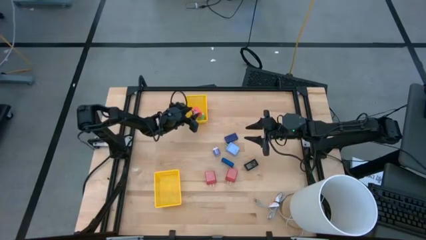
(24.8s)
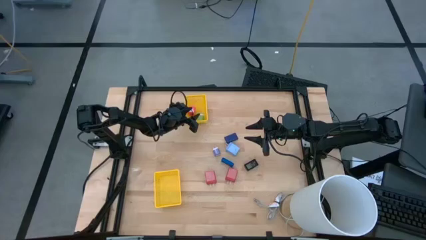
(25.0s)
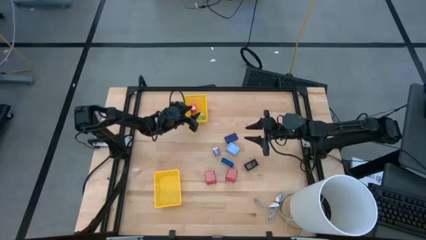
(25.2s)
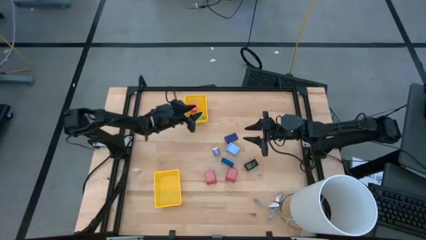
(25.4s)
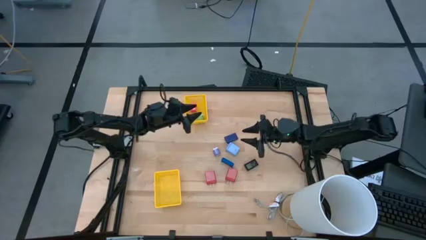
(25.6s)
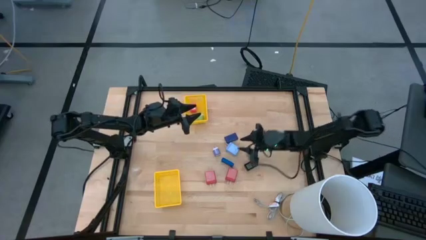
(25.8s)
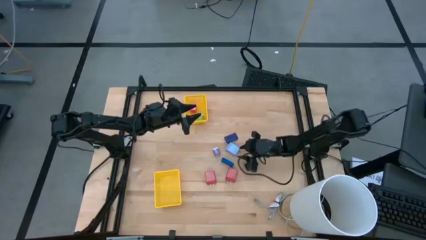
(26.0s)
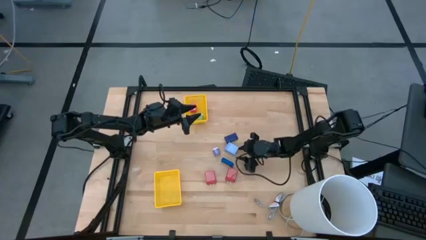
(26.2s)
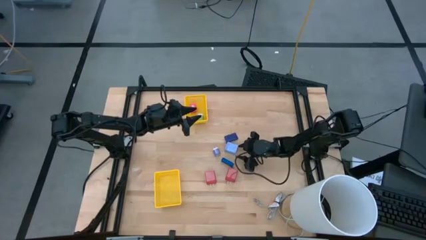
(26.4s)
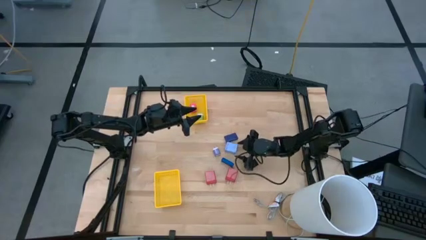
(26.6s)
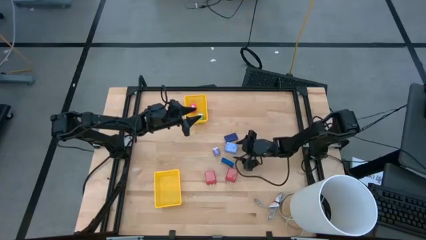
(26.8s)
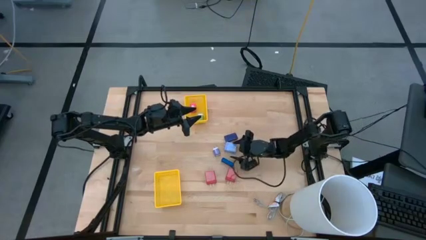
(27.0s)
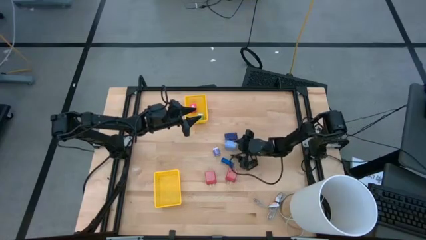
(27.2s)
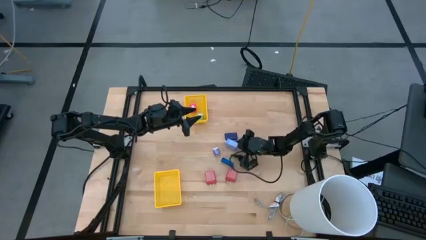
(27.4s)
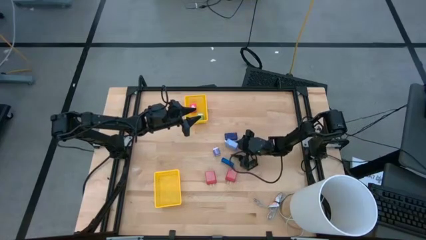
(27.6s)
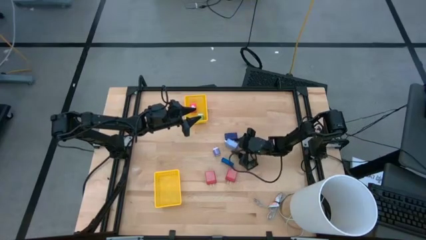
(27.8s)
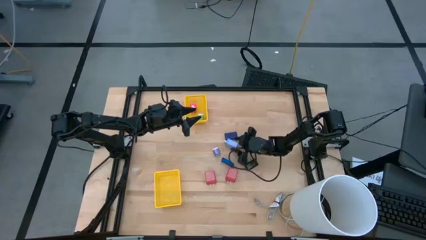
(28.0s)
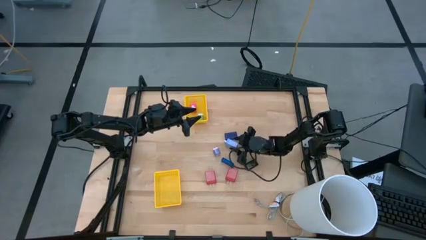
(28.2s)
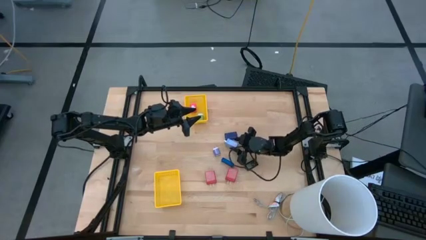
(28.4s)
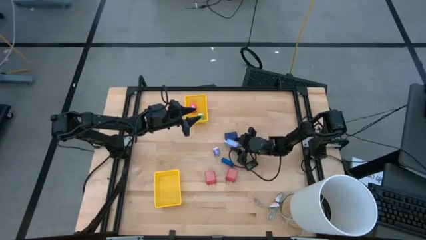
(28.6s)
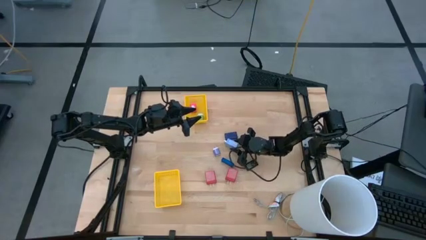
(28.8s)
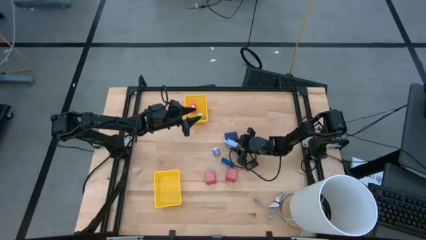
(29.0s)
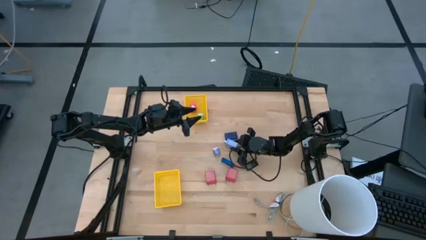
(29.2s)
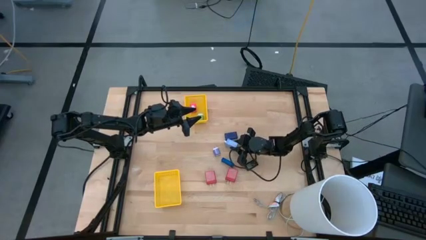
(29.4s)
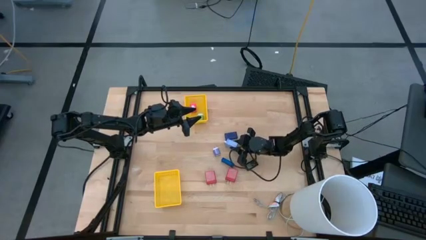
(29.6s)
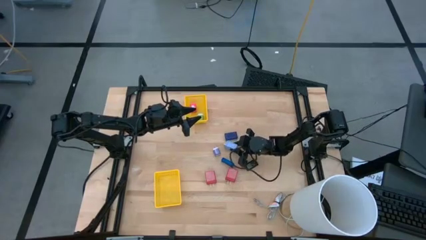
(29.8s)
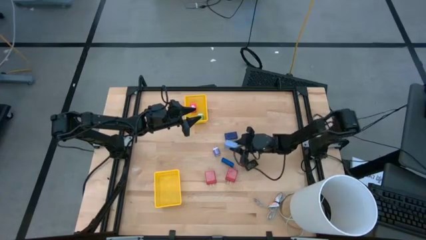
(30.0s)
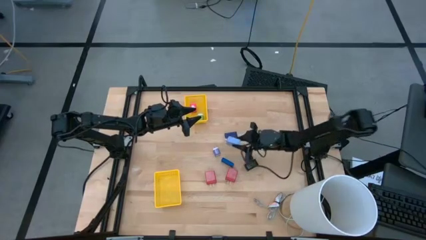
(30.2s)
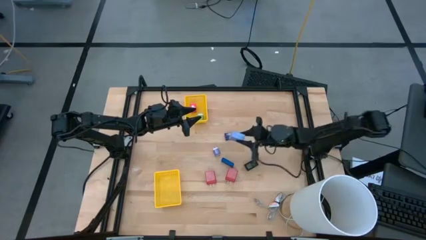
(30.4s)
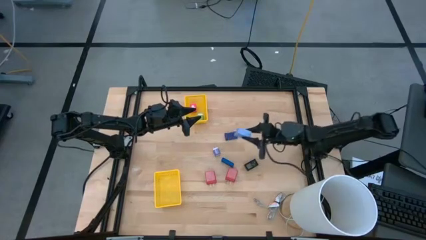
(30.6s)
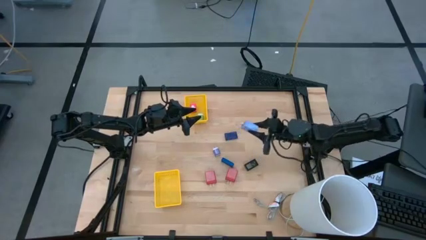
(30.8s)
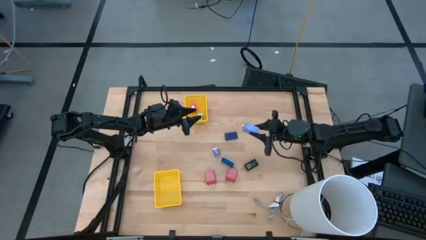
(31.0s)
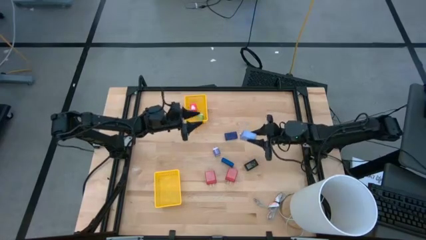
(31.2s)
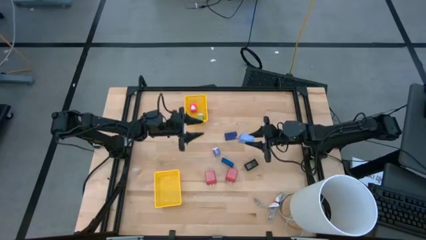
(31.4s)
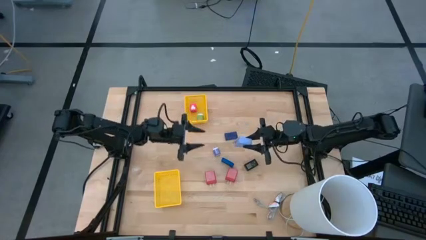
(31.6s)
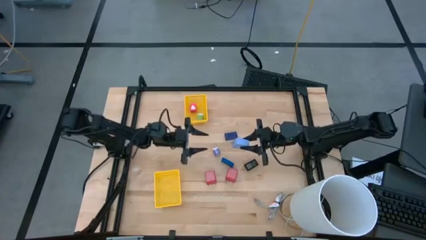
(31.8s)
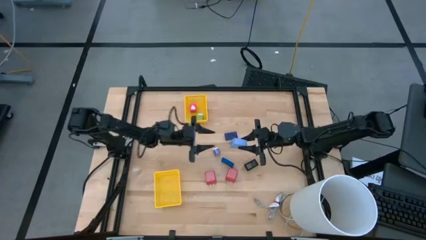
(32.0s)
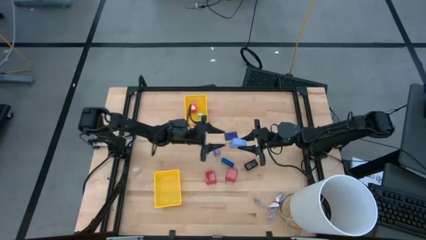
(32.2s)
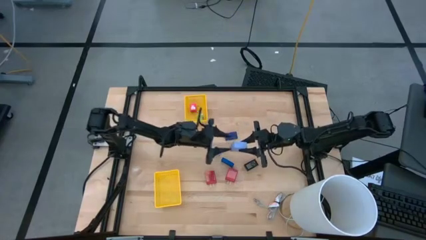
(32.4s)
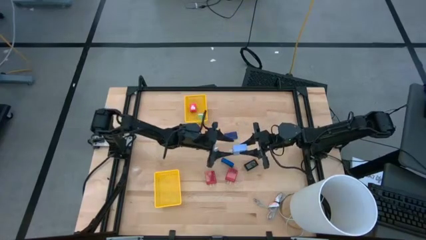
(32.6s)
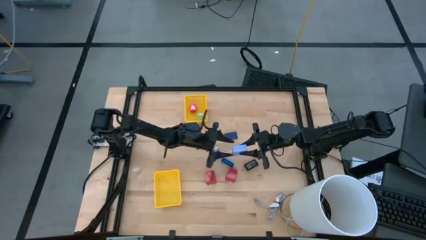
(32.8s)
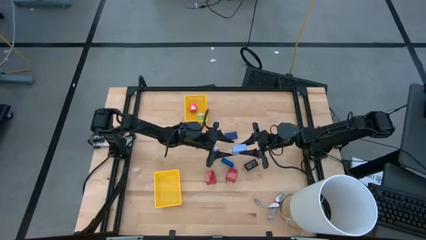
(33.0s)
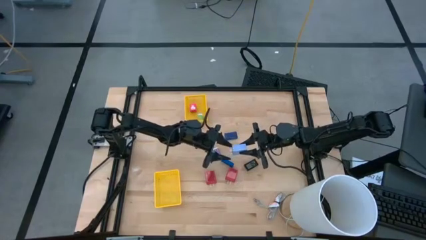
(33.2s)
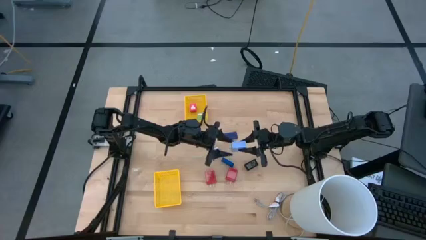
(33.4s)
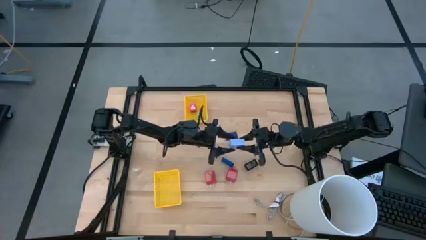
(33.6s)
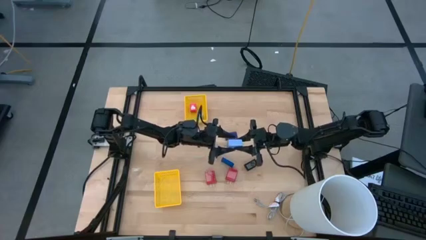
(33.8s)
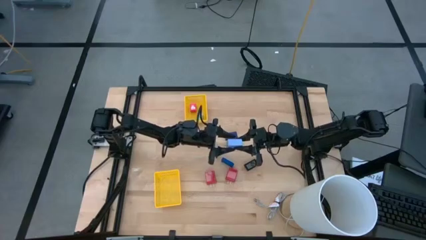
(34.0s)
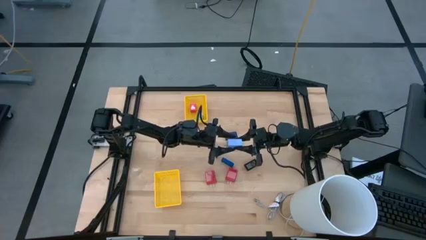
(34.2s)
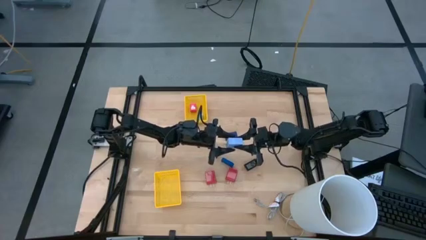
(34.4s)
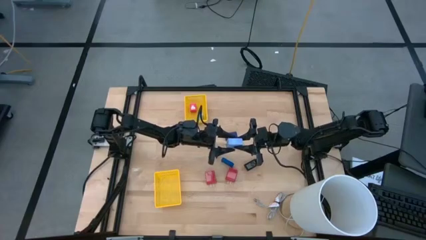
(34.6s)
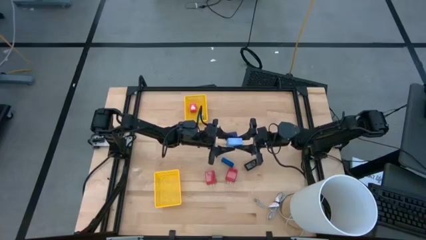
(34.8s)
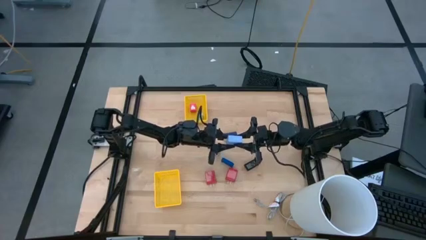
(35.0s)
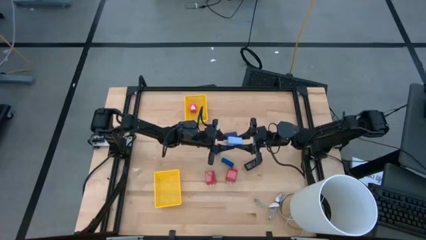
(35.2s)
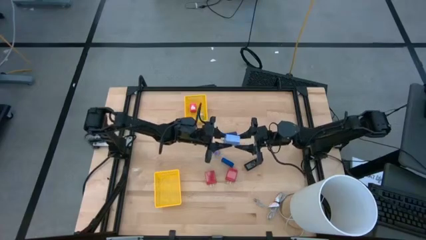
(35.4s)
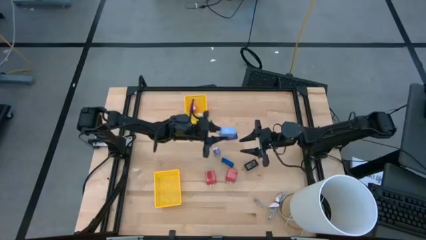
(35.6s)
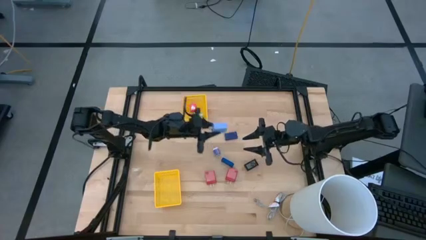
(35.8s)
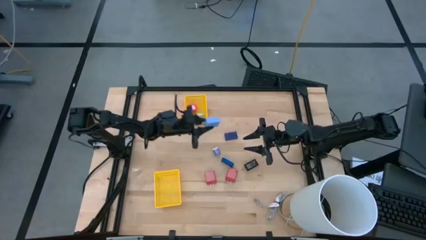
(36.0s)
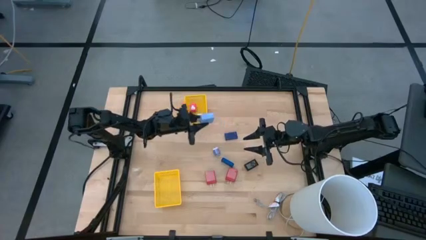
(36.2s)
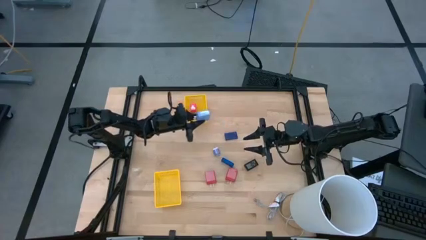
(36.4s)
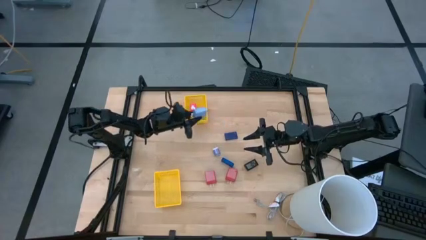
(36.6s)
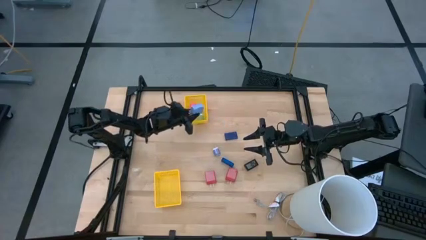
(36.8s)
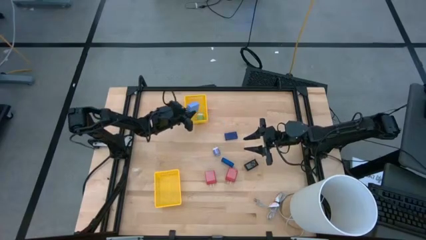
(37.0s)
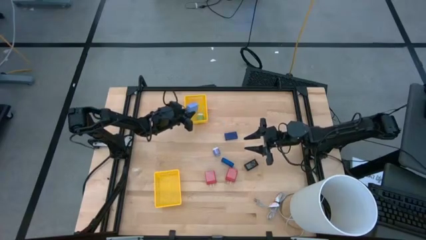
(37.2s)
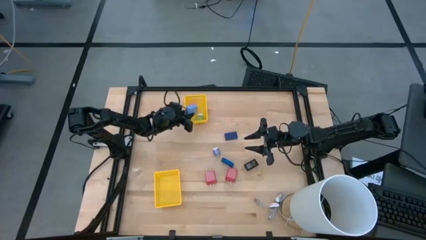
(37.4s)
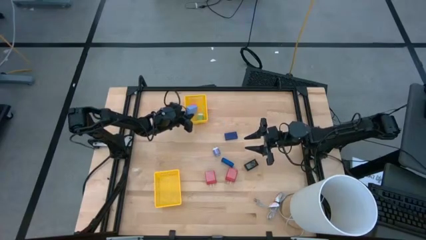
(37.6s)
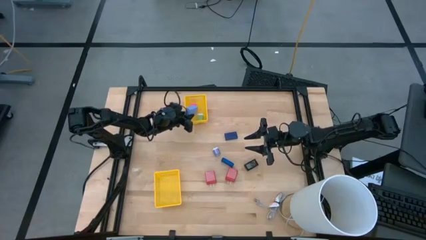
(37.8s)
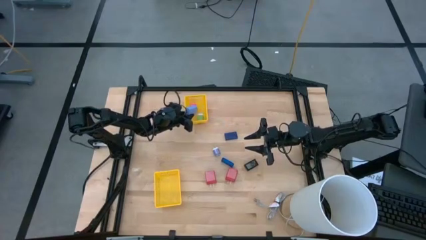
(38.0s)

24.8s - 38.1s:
Task: Pick & Place Office items
Put the light blue charger adapter into the top yellow bin
